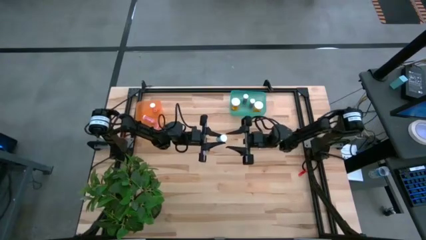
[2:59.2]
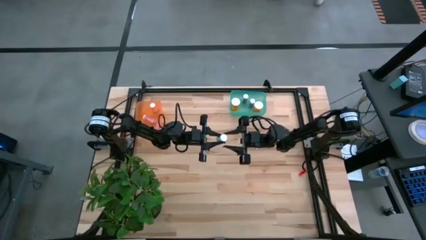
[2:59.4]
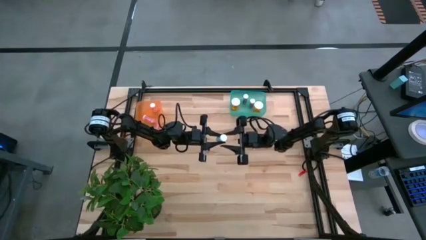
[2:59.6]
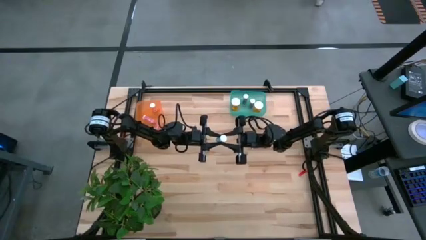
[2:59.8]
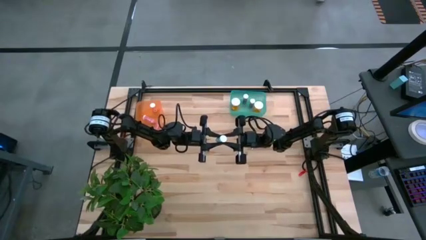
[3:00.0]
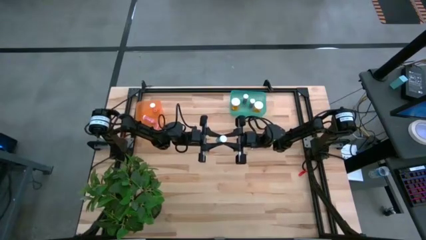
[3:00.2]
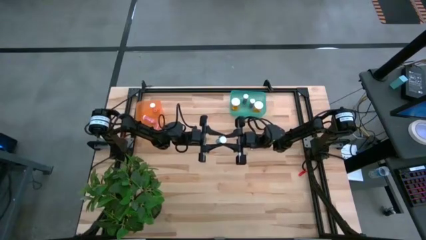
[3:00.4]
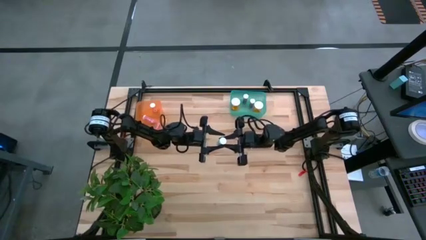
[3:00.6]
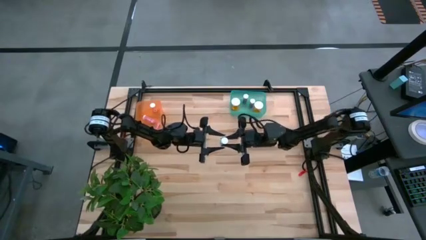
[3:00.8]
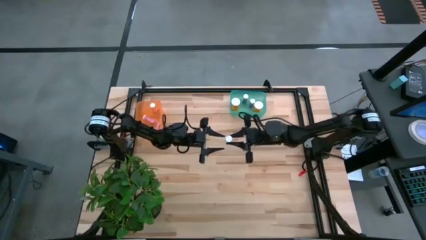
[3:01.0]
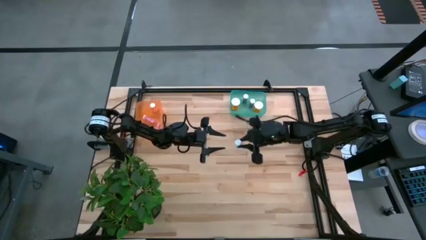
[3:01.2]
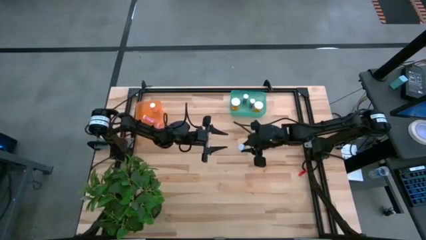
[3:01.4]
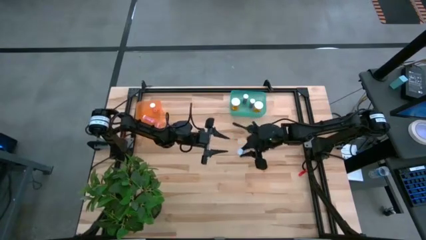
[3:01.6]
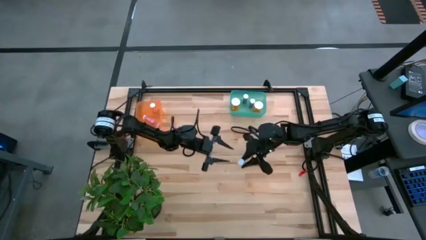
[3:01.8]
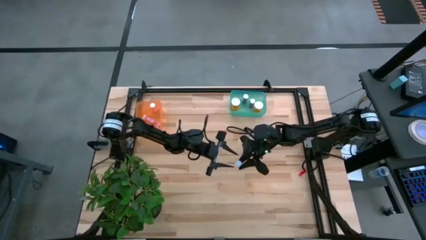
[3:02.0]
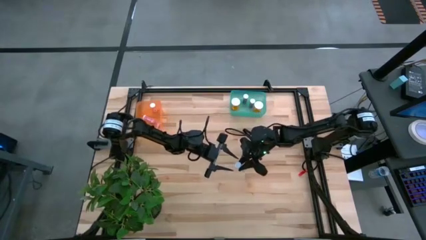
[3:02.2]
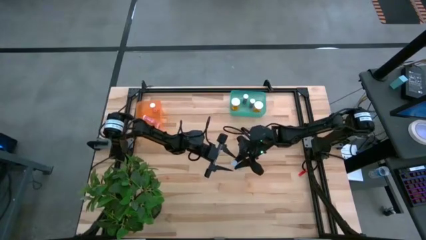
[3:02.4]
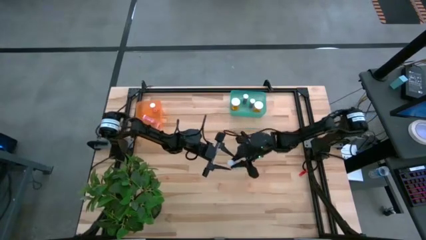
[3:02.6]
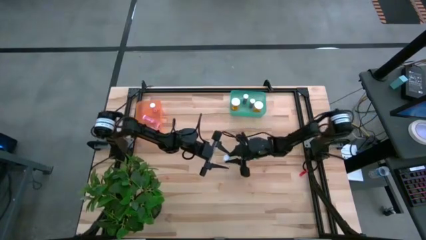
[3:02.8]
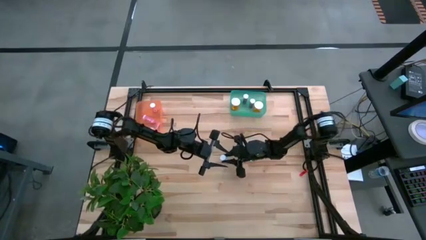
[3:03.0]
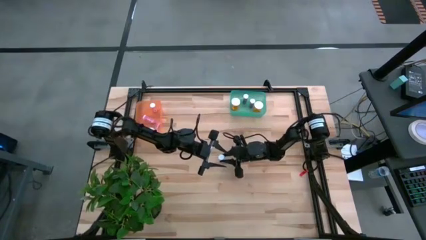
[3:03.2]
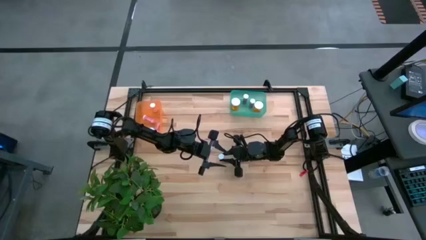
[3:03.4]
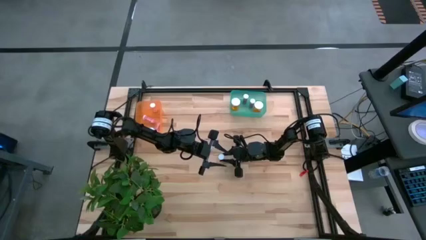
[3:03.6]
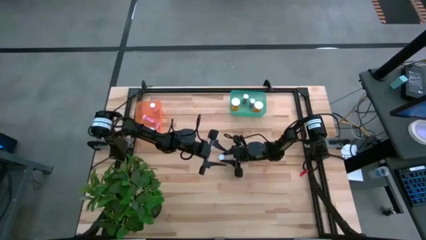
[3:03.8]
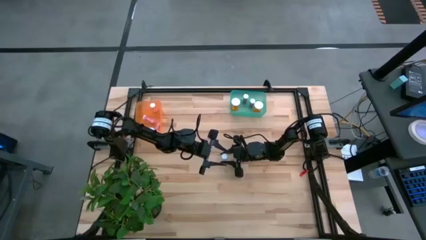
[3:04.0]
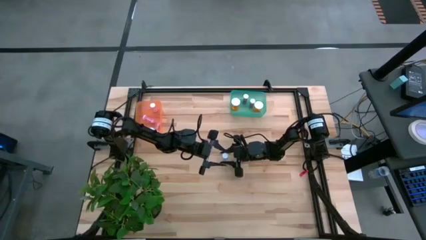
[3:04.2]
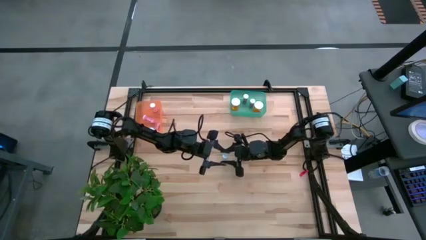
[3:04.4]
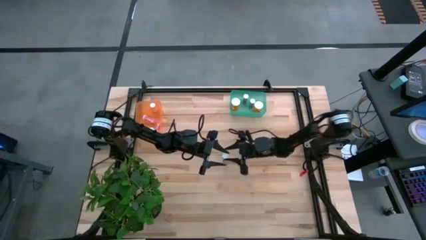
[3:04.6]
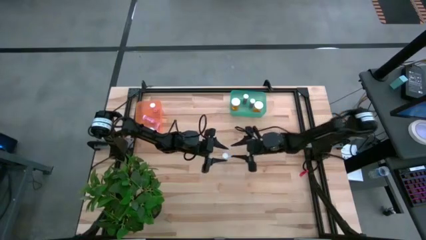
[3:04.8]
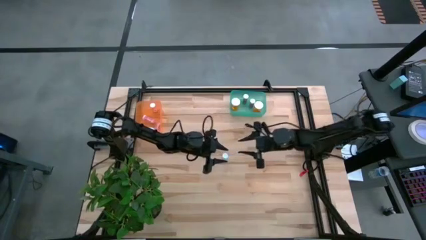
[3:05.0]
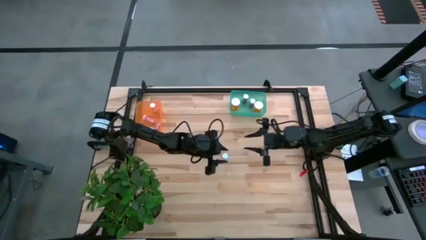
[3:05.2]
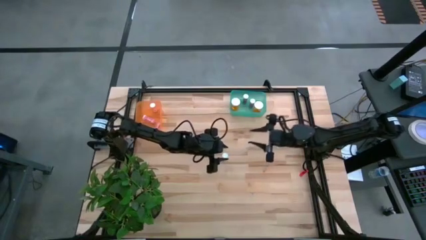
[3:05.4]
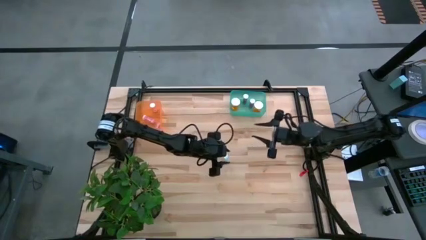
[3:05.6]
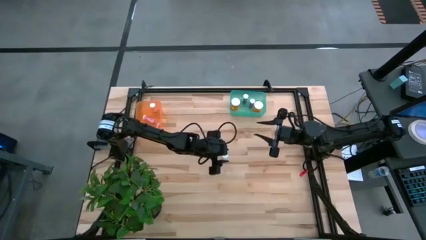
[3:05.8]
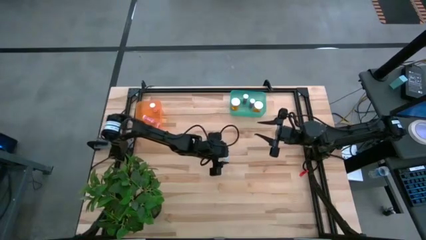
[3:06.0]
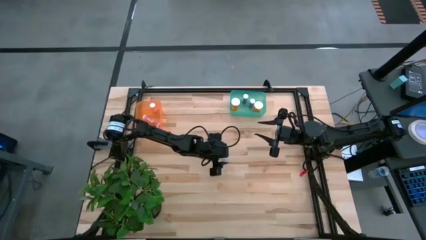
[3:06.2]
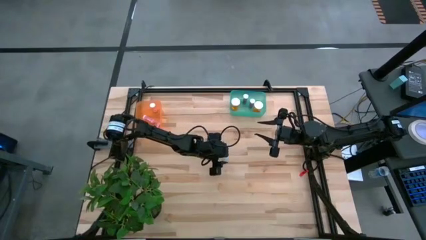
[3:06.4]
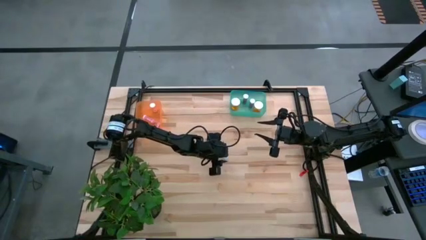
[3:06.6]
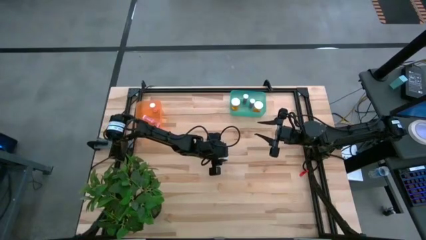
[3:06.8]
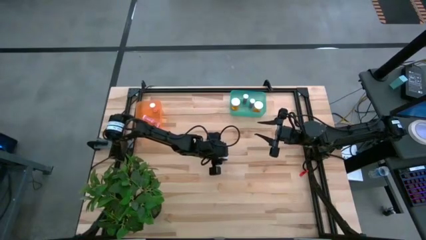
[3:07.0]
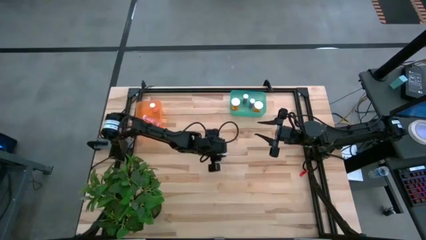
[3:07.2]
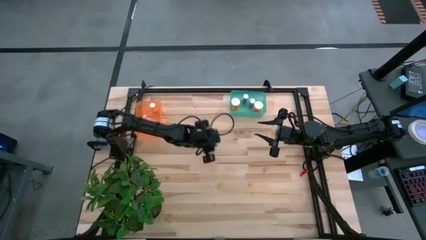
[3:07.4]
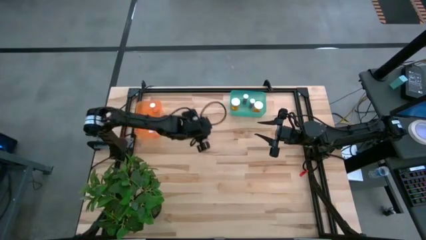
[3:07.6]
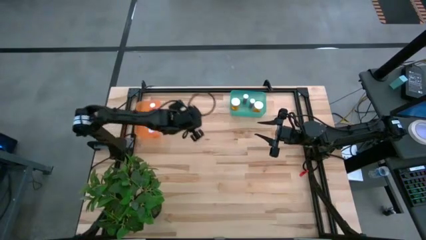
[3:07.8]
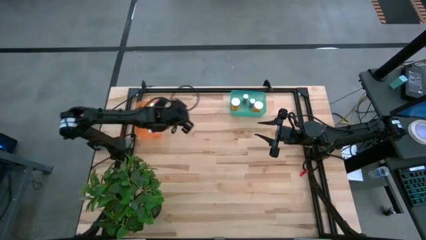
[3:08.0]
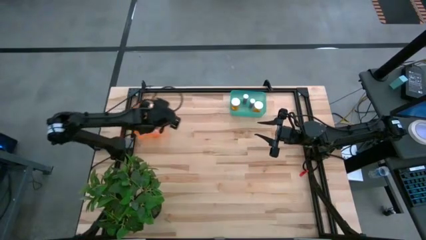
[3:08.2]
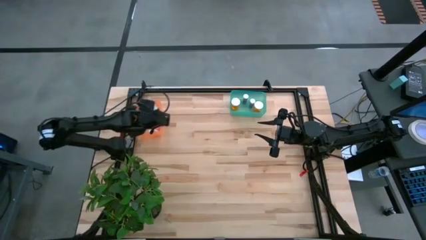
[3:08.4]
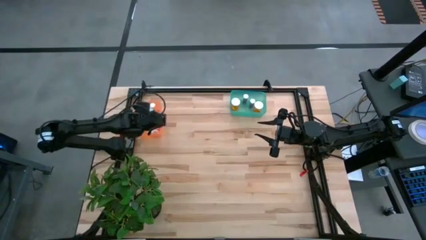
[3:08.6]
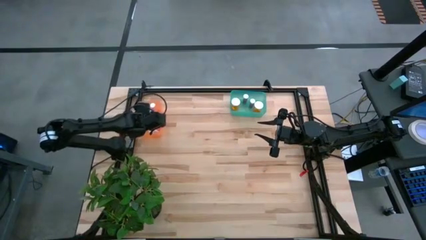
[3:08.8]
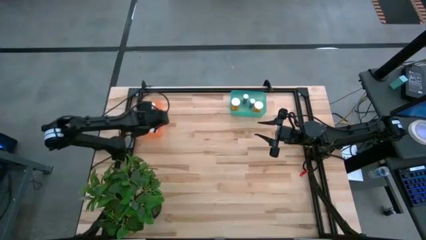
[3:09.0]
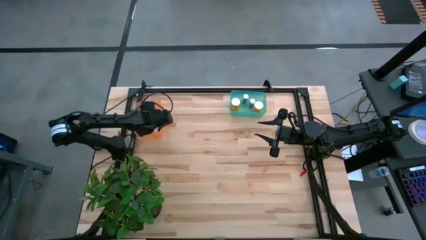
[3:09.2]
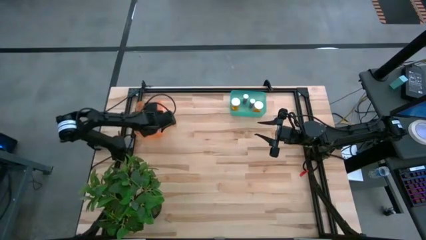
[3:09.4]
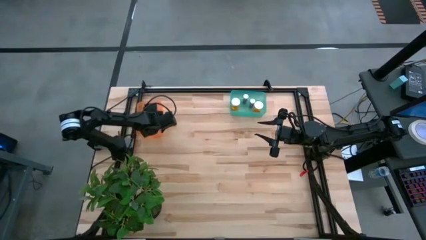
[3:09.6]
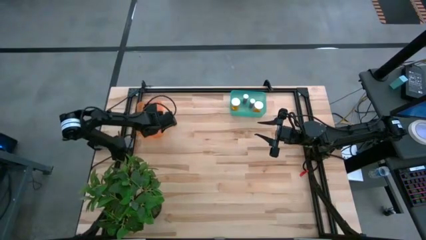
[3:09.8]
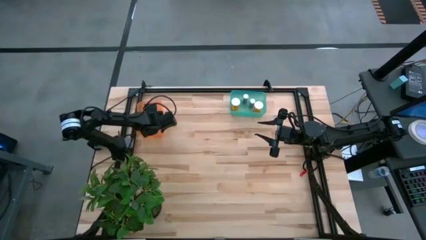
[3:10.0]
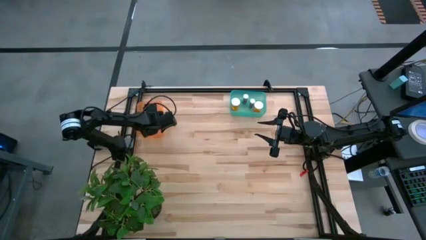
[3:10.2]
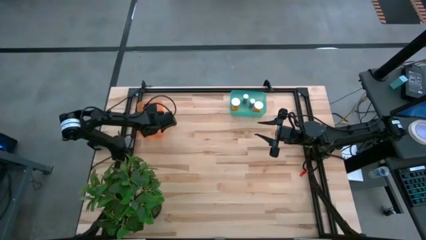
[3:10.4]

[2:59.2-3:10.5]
Task: Pick and place medicine bottles into bin by pill shape (circle, oval)
Put the blue tablet bottle into the orange bin

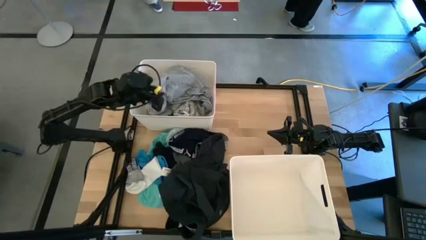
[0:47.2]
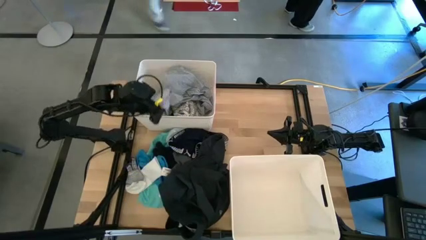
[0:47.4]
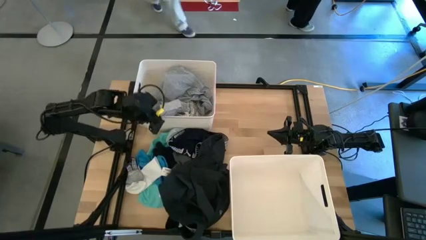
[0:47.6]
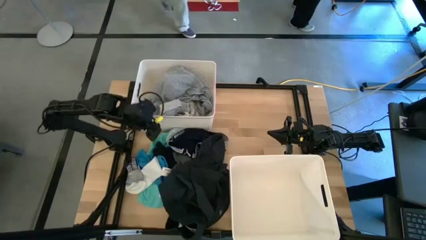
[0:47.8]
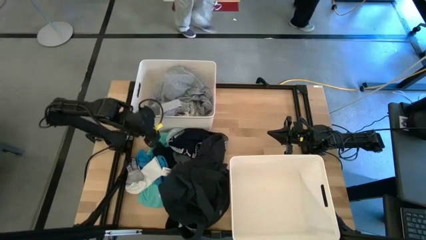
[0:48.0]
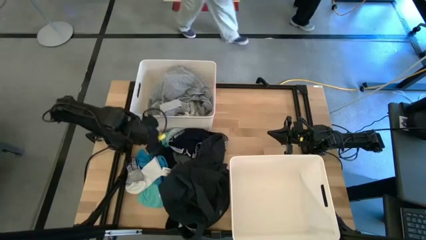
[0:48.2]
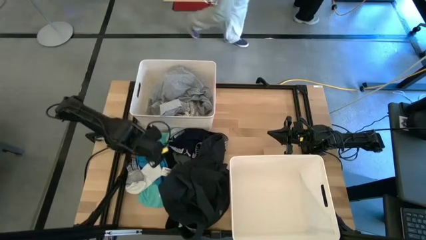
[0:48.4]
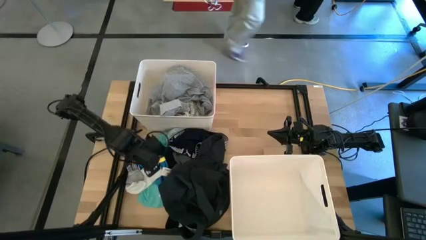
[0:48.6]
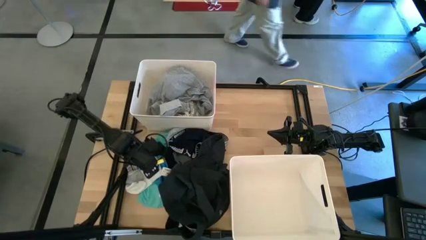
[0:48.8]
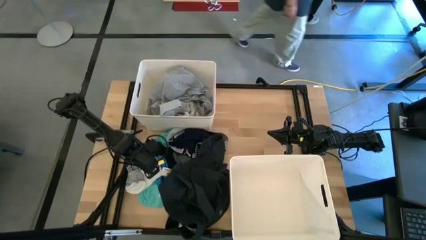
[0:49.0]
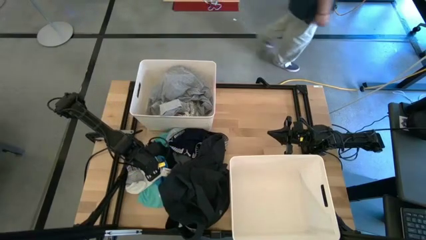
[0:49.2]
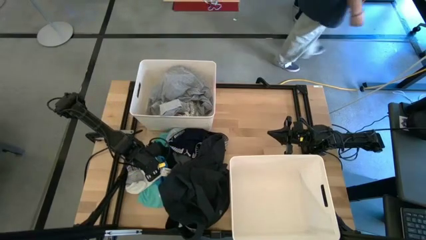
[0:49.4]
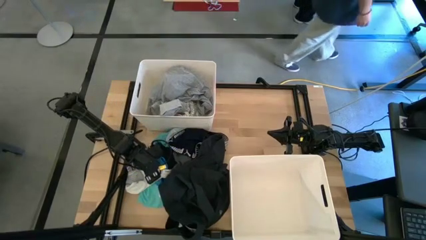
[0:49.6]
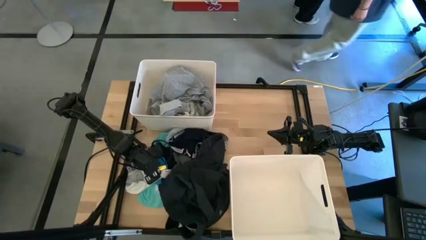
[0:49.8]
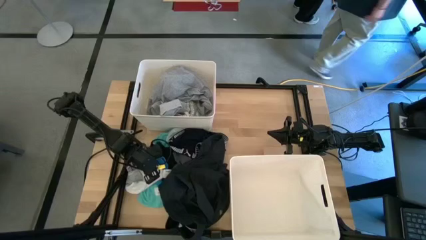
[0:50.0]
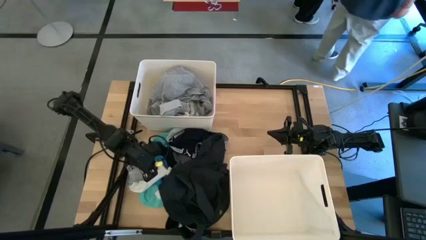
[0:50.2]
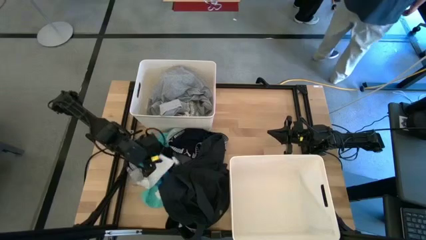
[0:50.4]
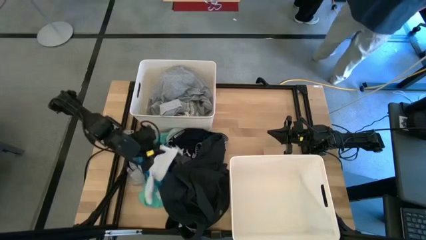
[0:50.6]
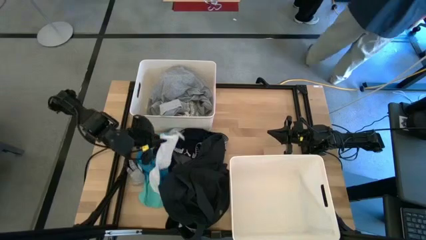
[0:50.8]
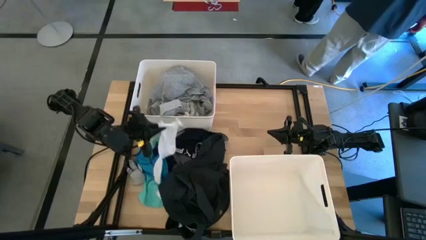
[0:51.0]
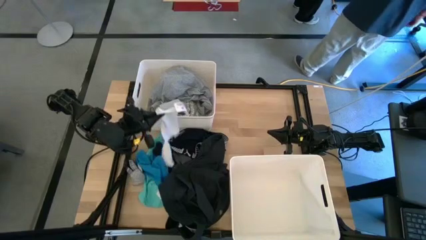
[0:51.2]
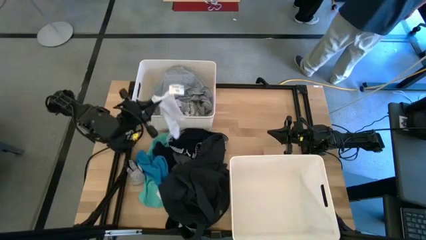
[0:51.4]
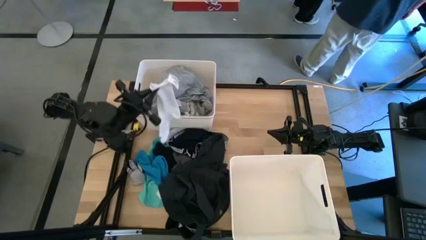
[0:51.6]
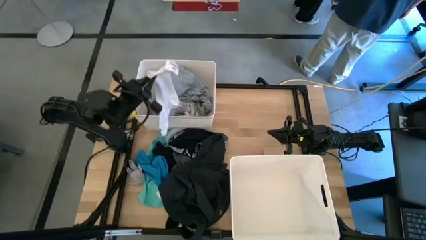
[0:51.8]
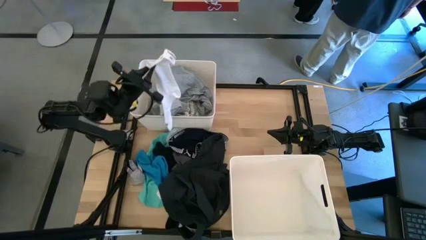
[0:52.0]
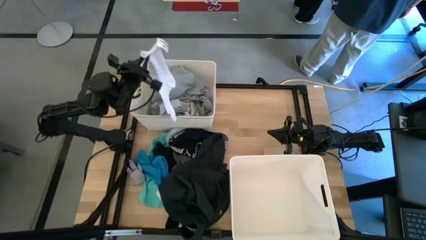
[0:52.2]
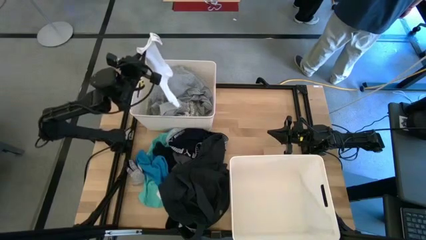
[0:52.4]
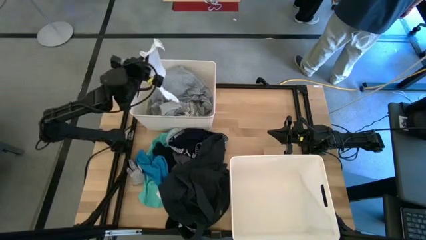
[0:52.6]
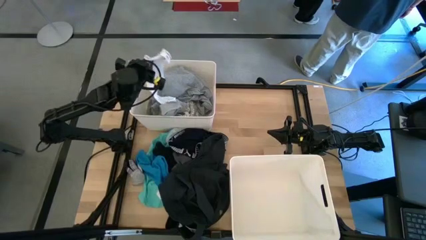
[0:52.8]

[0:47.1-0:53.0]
Task: Sort clothes
Put the white socks into the top left laundry bin
